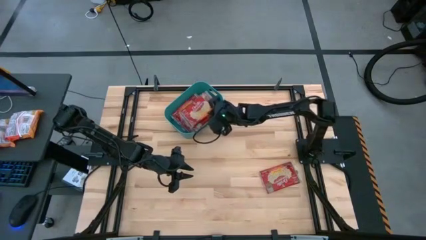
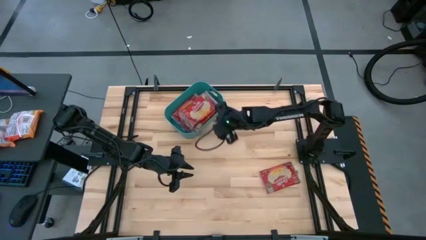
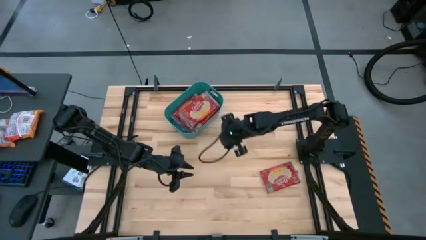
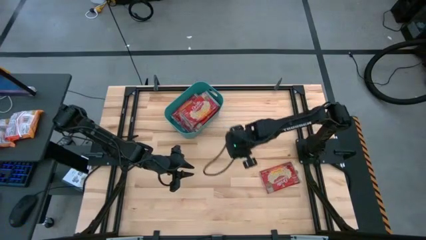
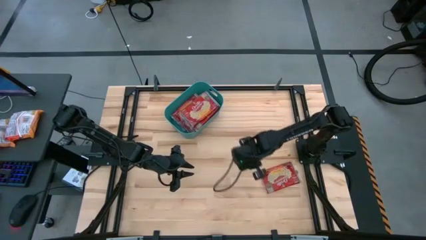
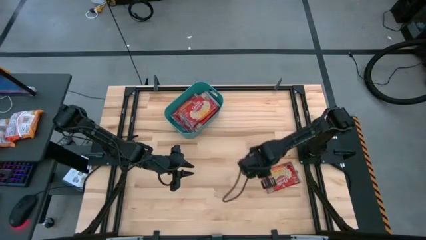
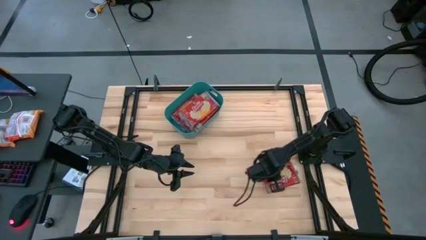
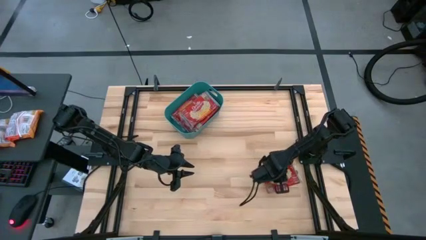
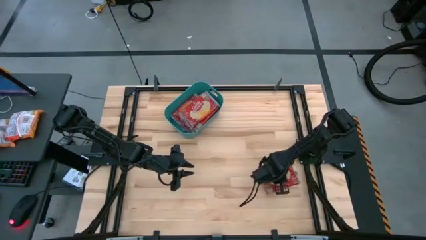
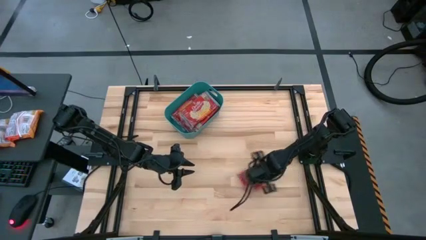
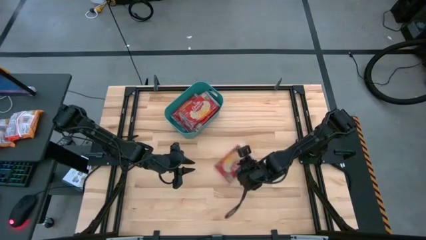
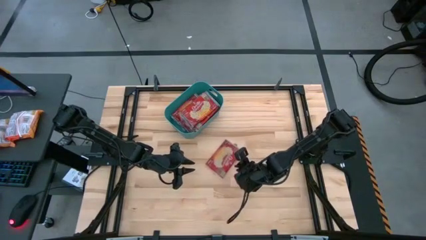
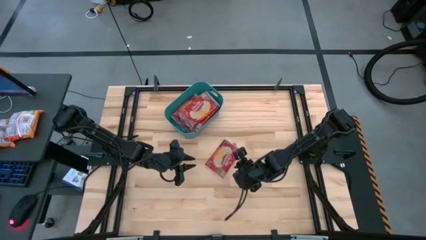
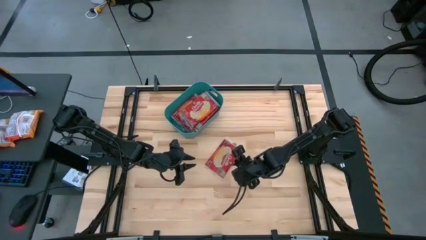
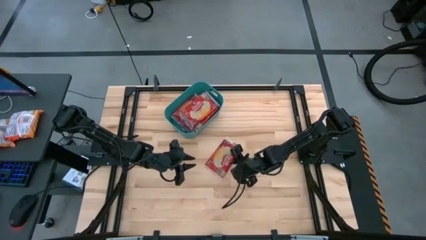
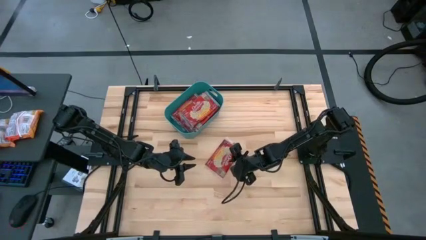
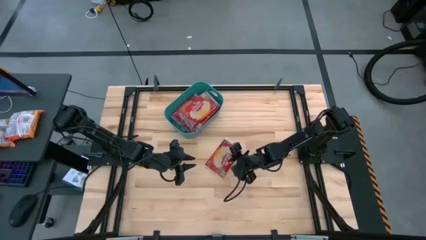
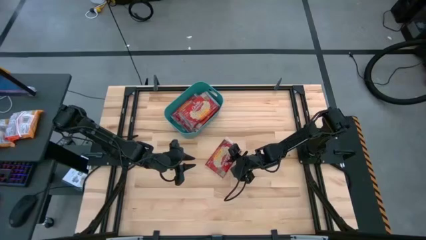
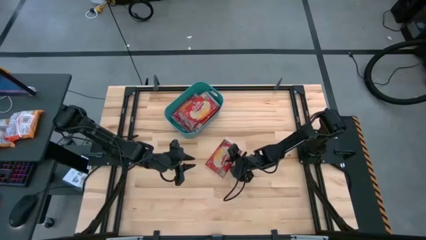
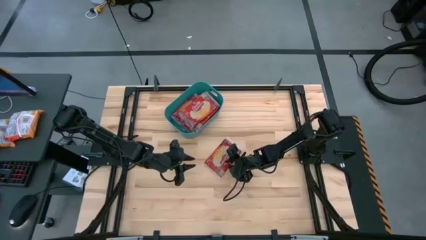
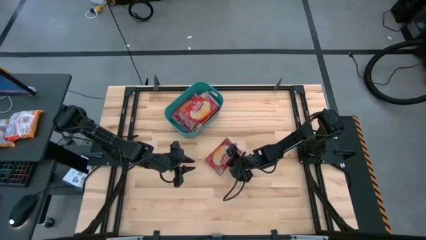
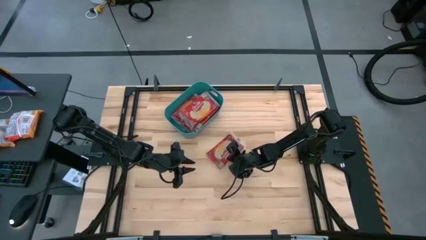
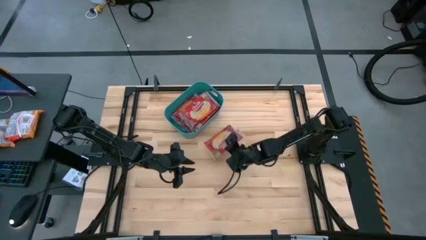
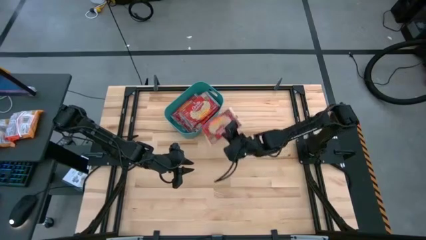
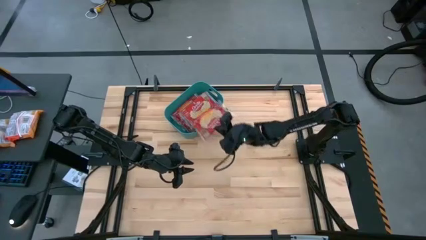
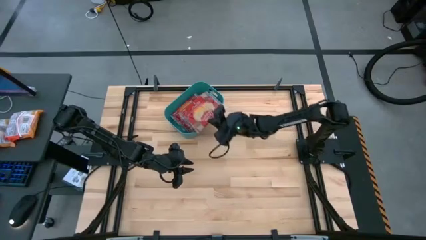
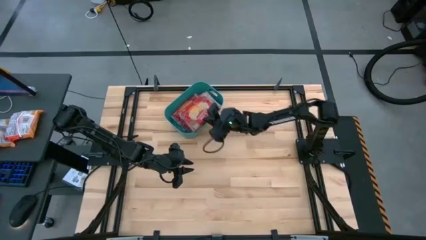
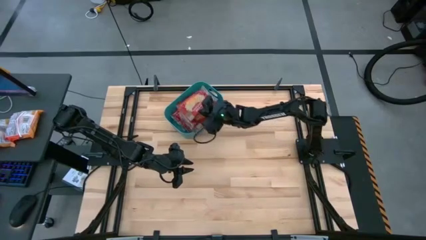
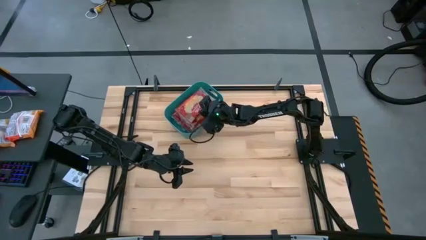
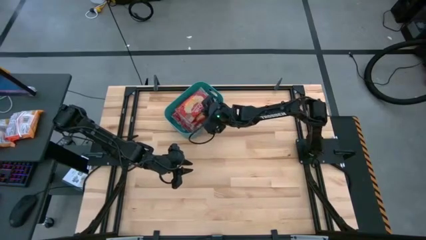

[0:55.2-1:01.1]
Task: Sort popcorn bags into baskets
Put the red popcorn pack into the blue bin

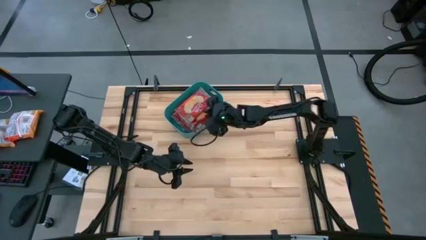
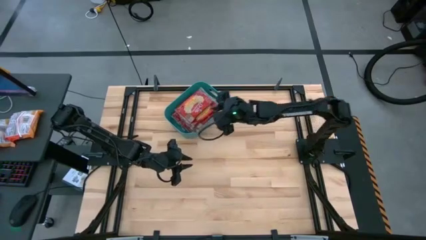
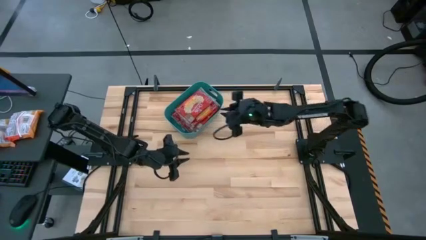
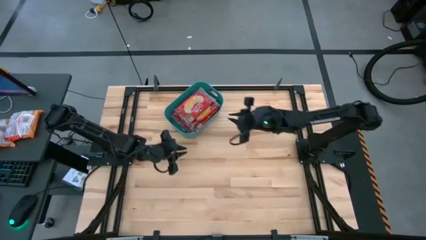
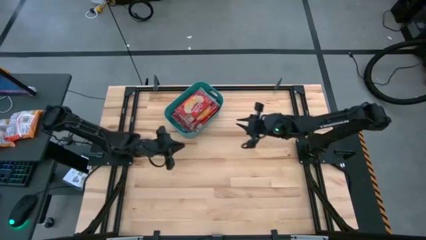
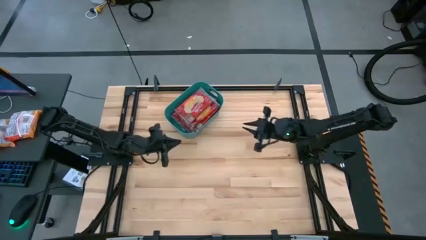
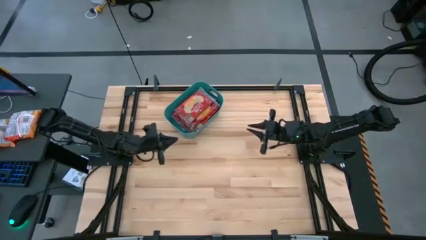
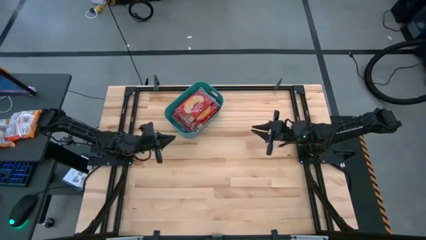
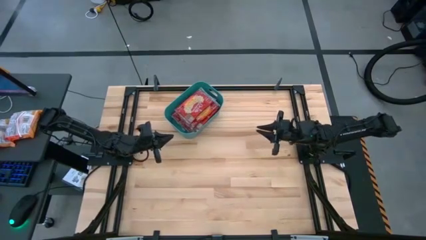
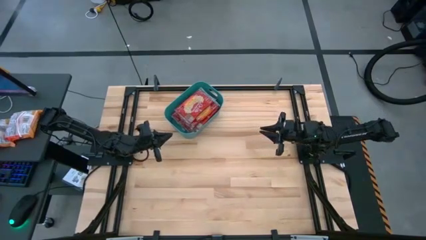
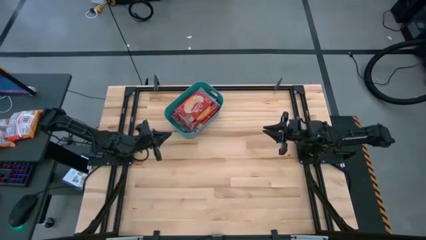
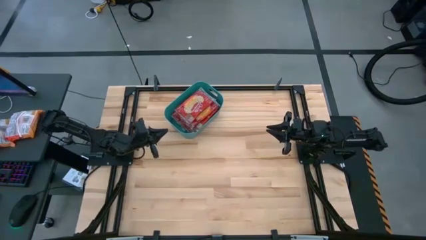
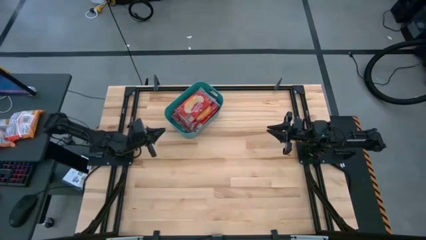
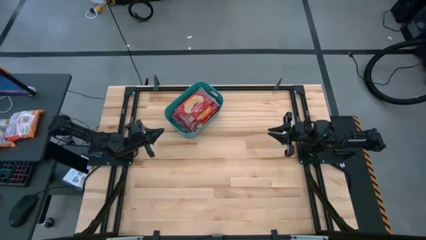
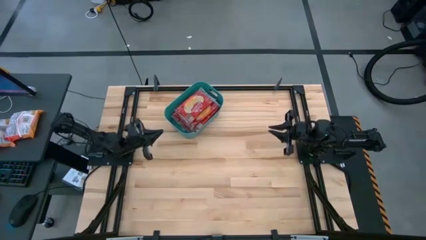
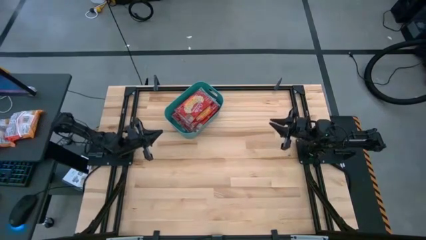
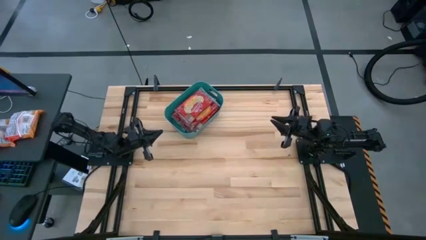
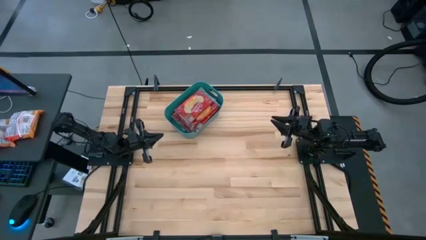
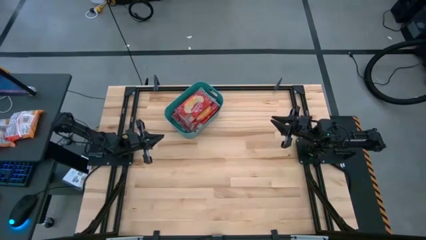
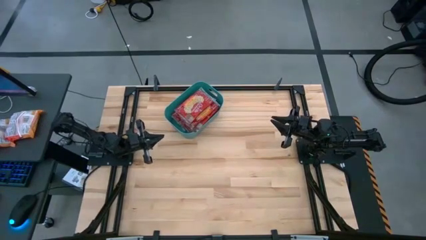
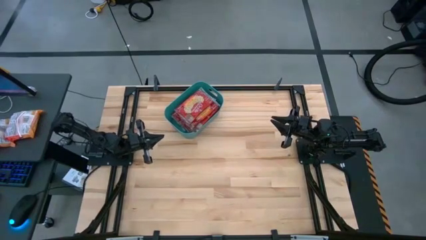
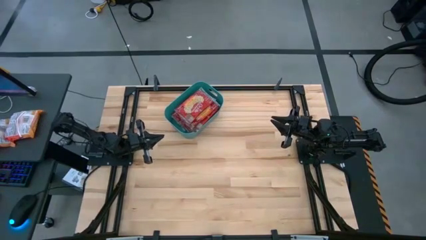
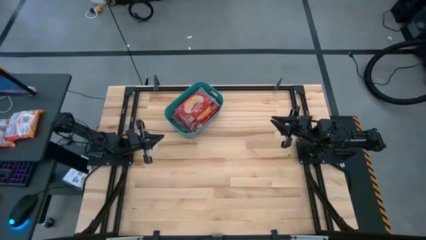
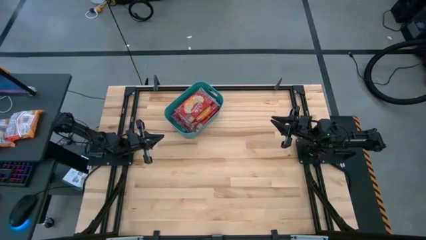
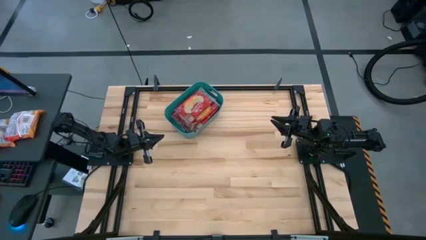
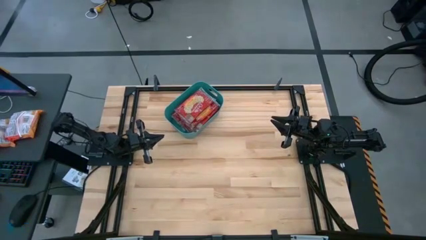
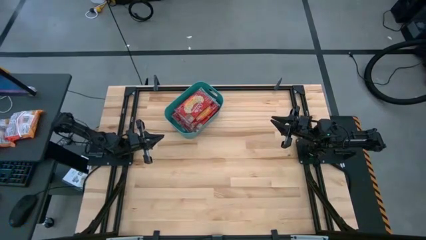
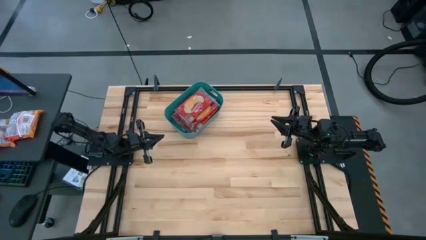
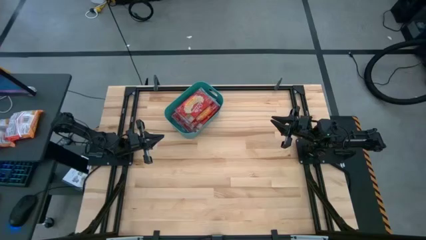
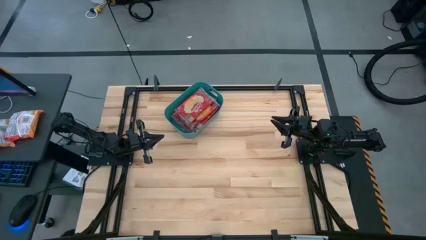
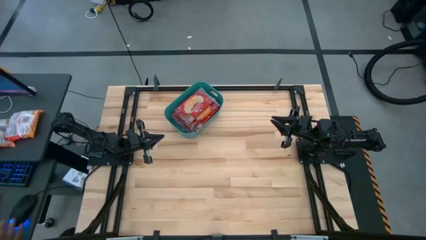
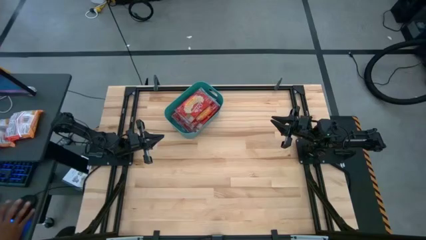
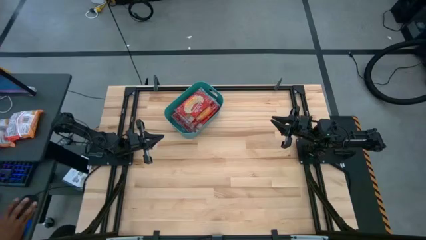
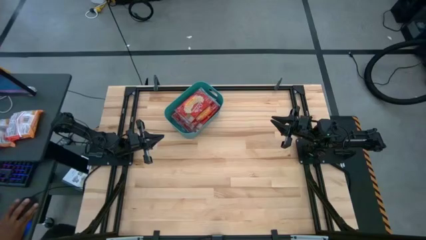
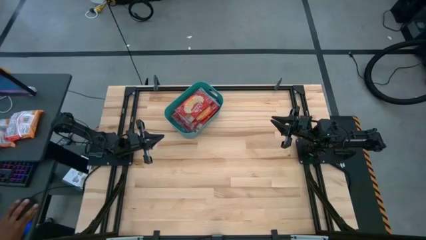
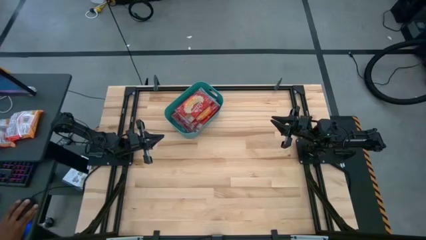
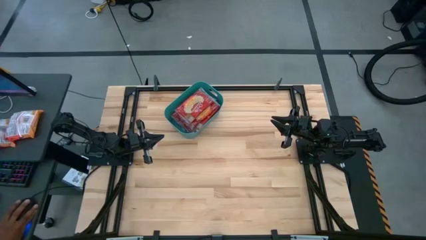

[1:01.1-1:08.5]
Return to Home Position

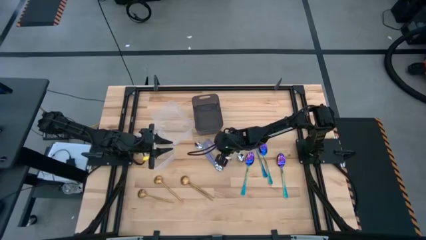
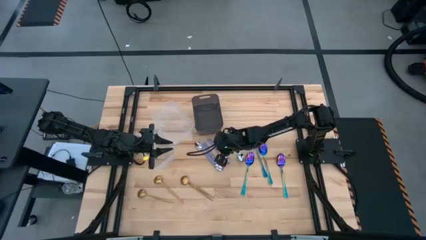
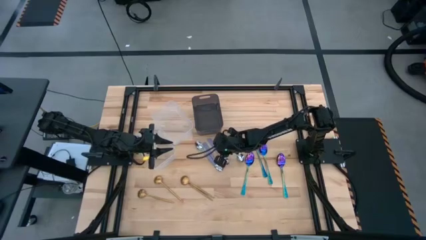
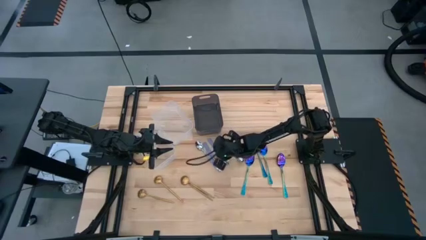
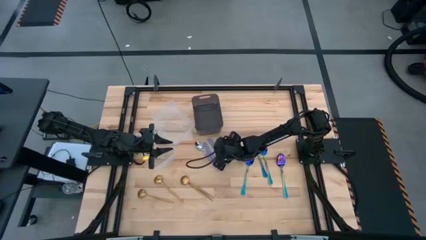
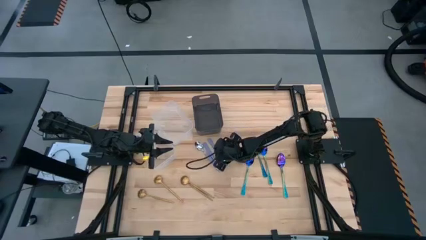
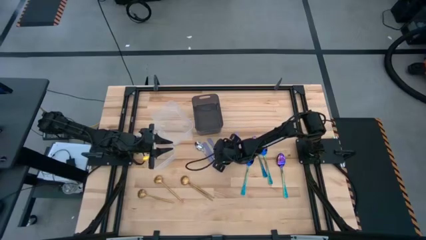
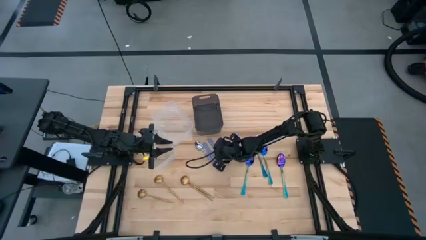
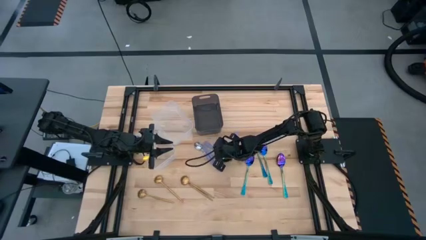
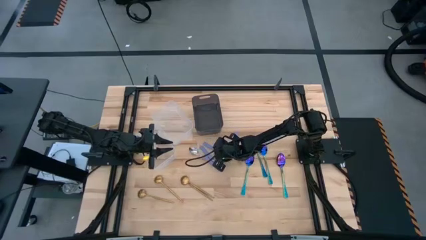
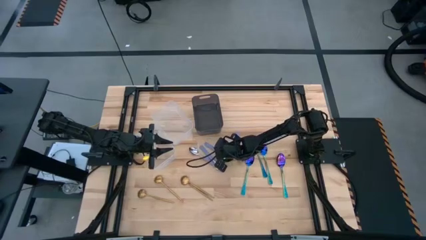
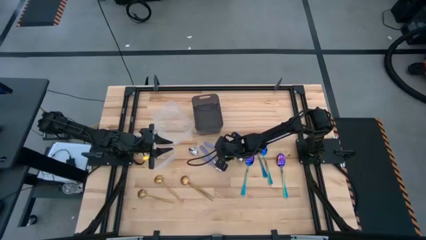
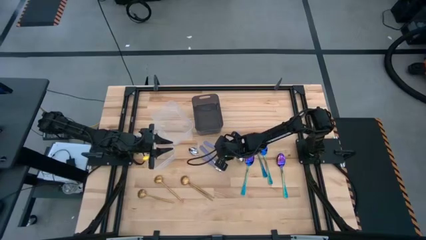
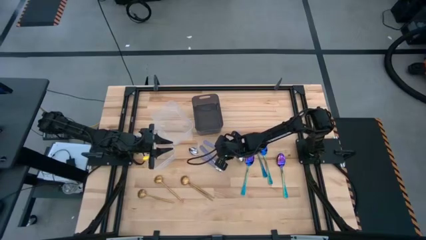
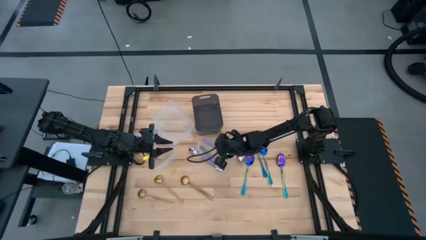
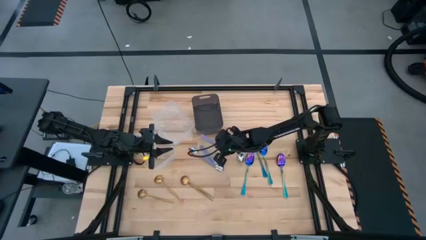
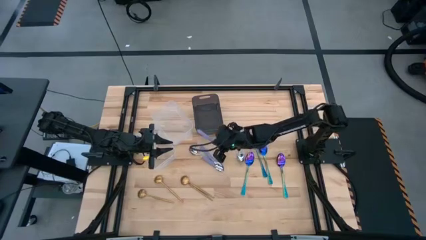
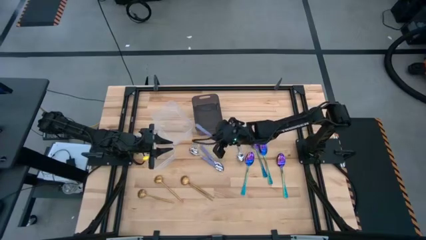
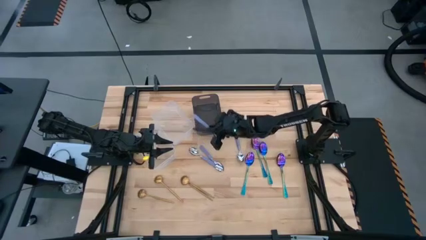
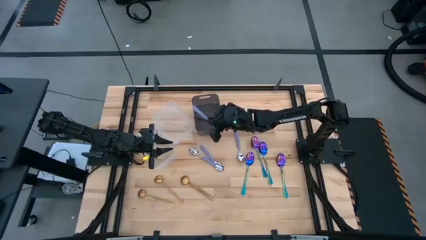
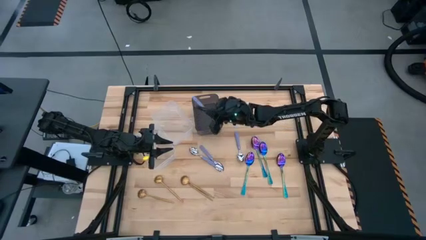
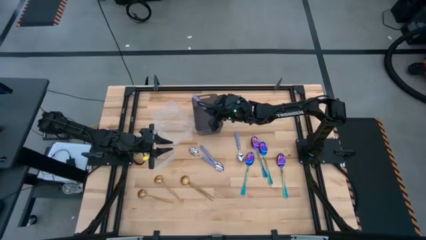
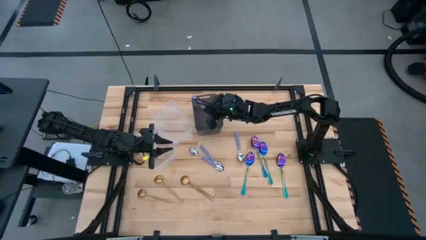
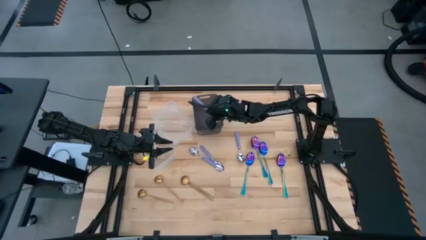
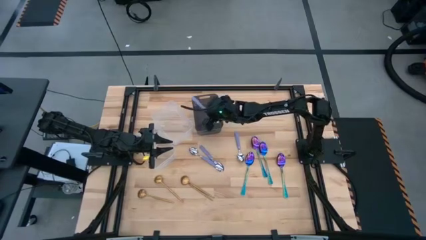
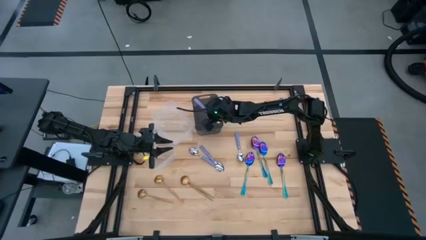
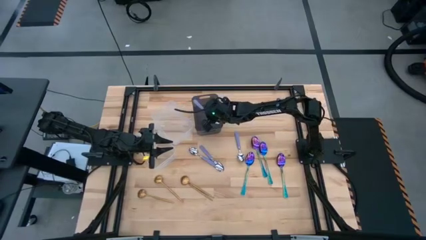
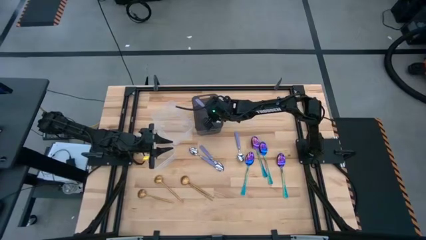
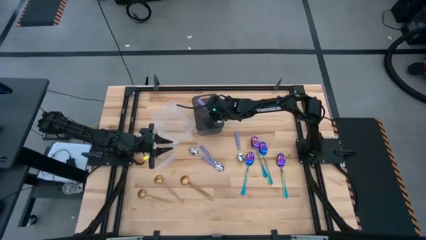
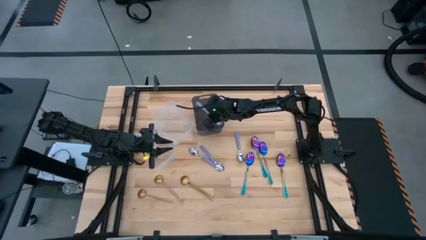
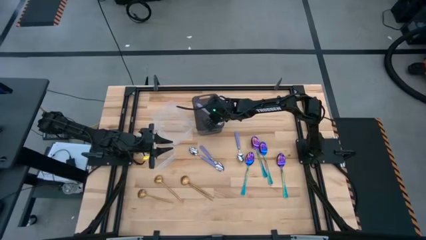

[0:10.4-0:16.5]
Task: Sort silverware by color (type)
Put the purple spoon into the black transparent bin
